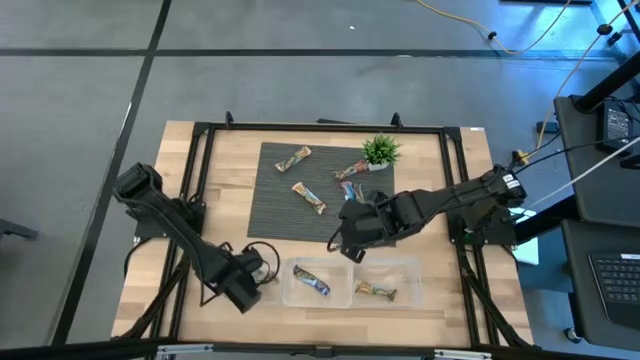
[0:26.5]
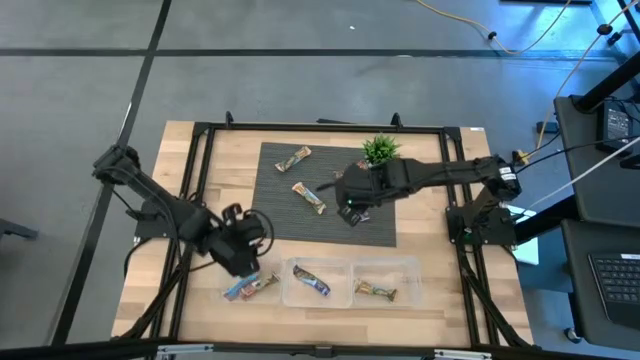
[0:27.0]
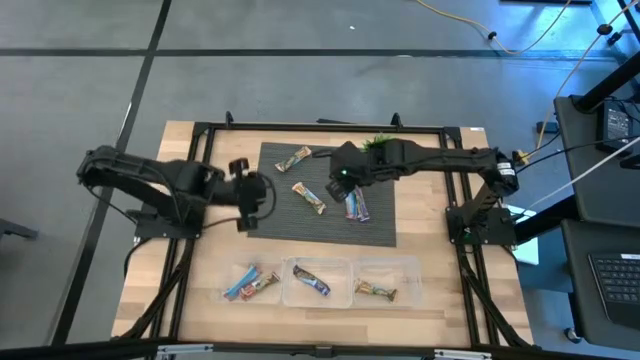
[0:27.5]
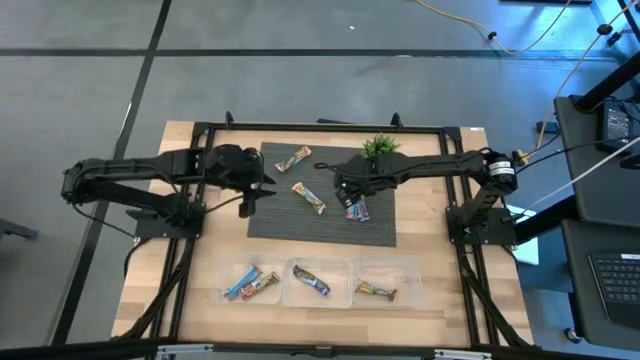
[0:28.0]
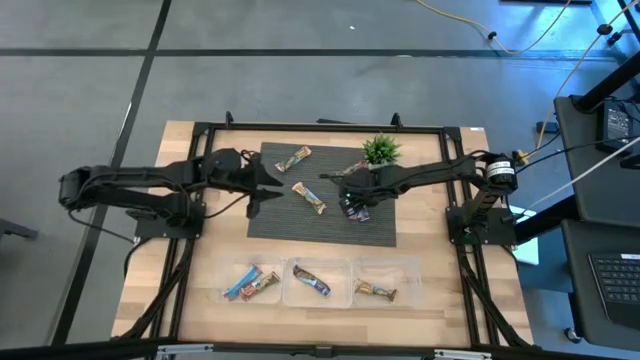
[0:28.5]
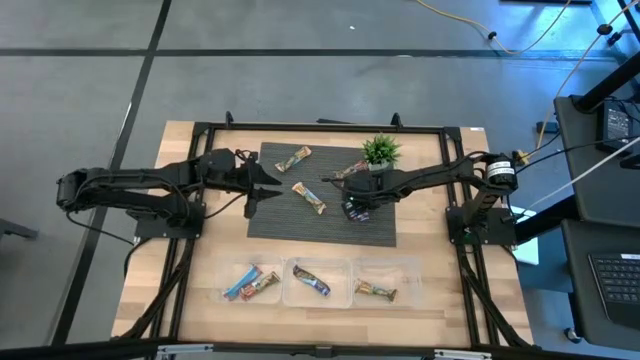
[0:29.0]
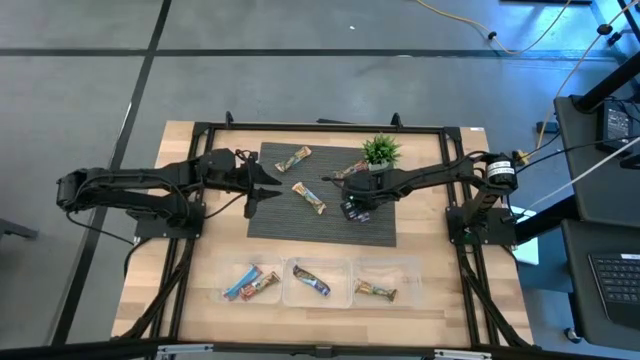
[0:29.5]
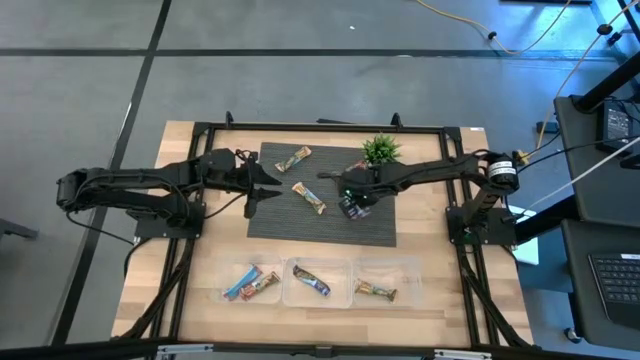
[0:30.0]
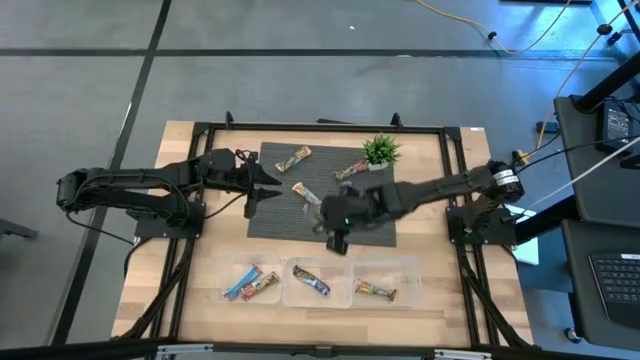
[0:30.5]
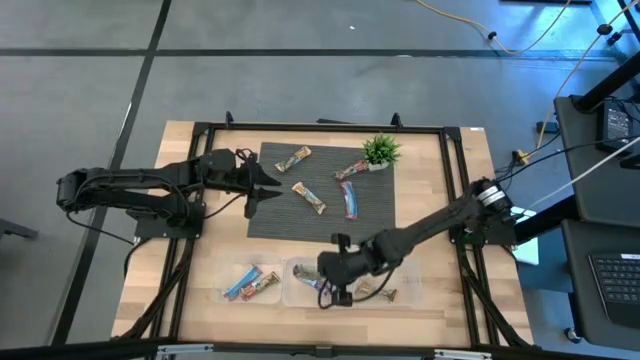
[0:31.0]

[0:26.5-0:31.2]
Task: Pick and place Granola Bars by type
Put the blue granola bar into the middle transparent bin

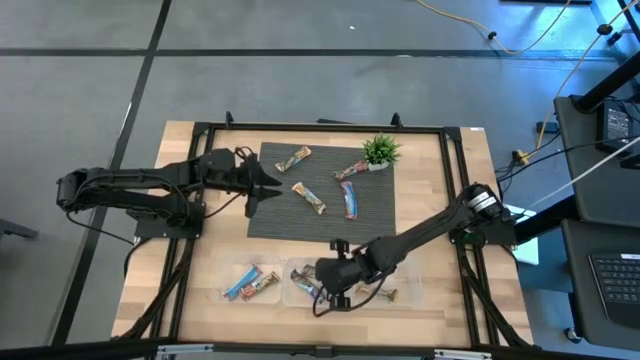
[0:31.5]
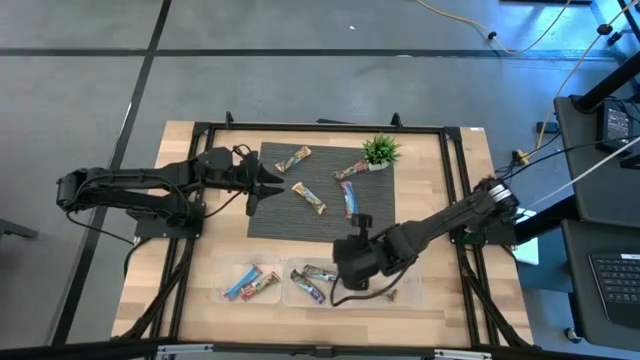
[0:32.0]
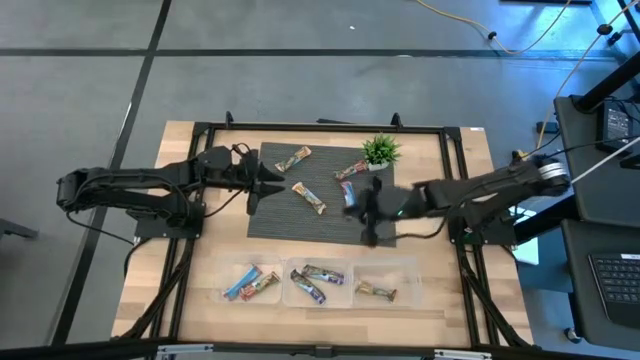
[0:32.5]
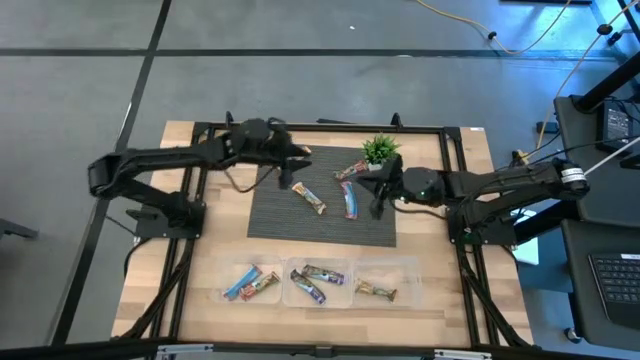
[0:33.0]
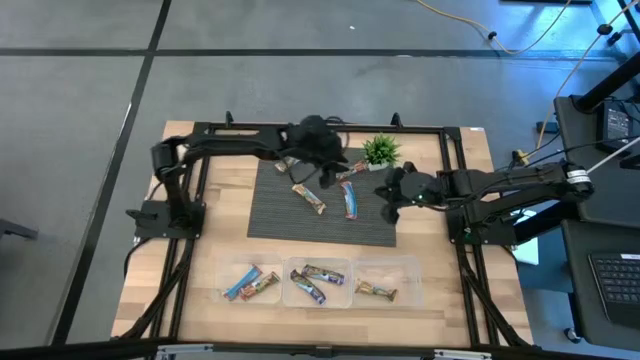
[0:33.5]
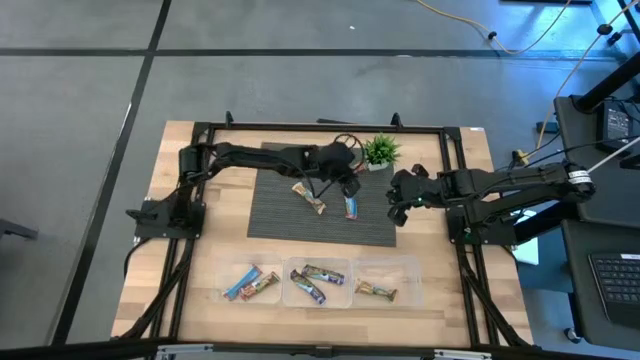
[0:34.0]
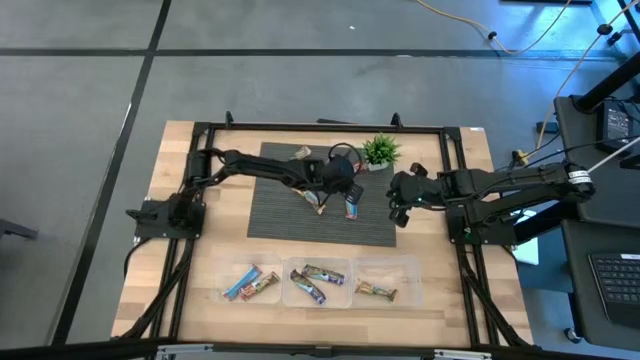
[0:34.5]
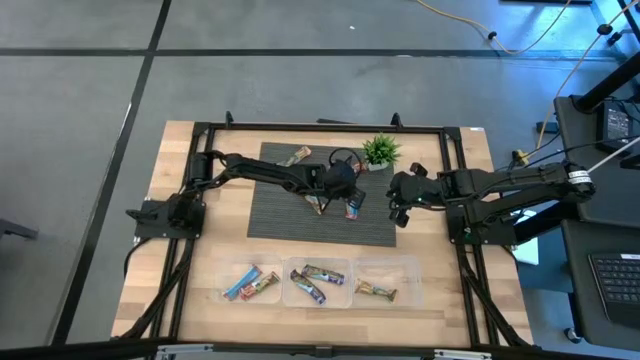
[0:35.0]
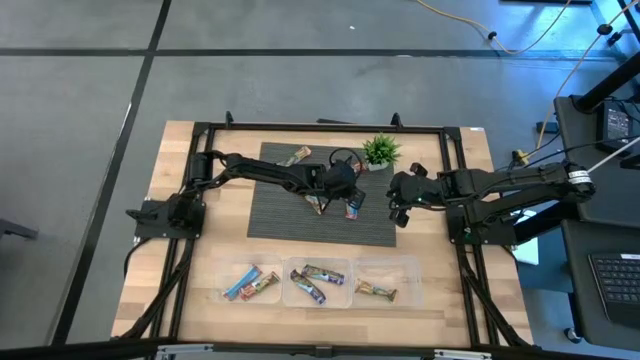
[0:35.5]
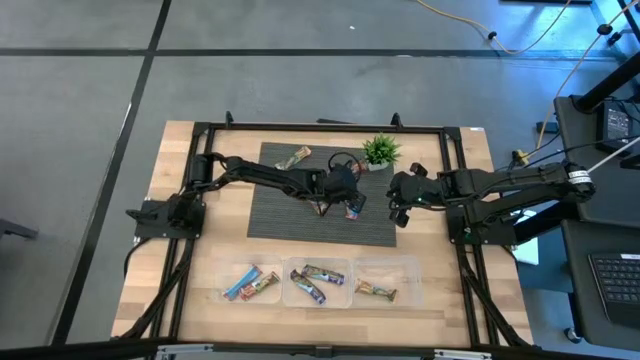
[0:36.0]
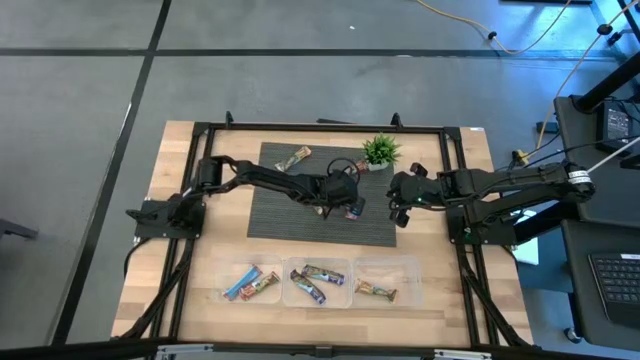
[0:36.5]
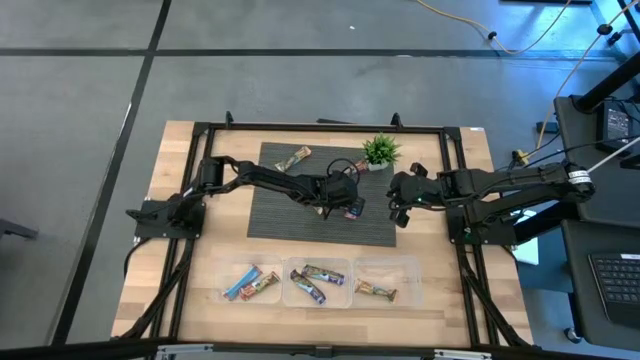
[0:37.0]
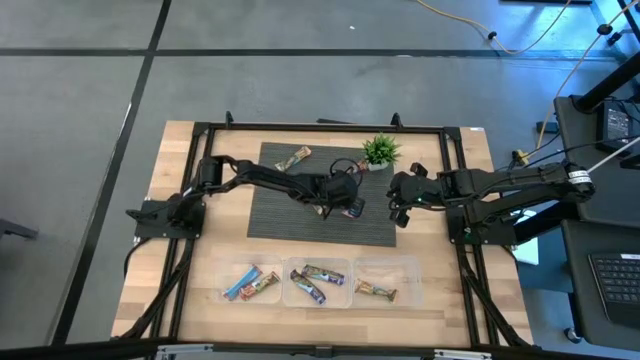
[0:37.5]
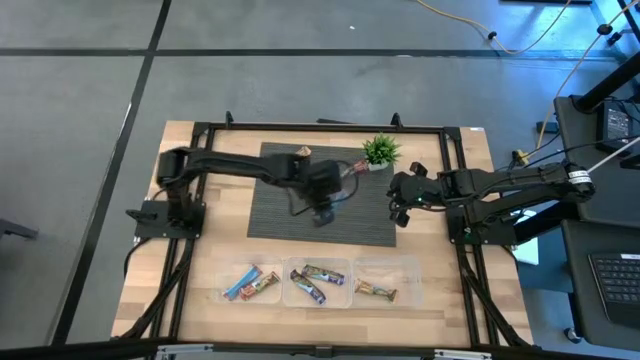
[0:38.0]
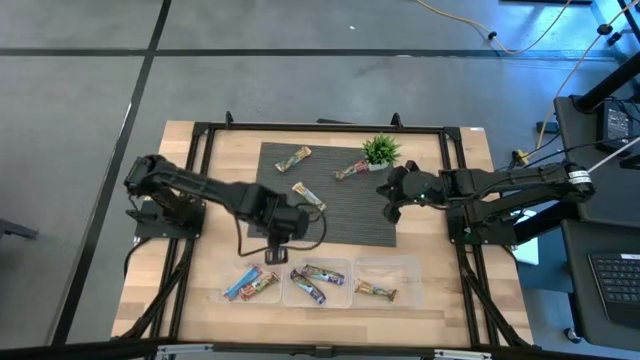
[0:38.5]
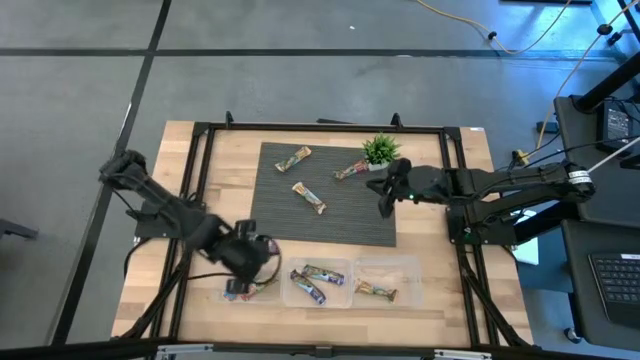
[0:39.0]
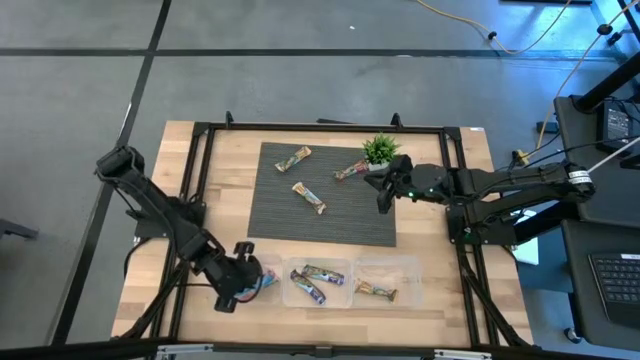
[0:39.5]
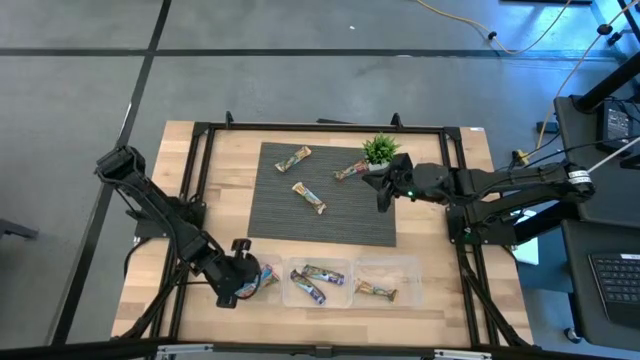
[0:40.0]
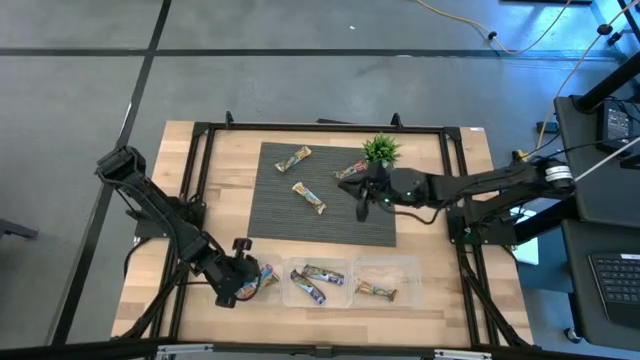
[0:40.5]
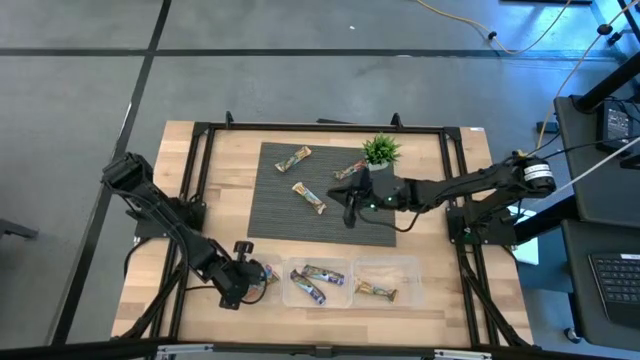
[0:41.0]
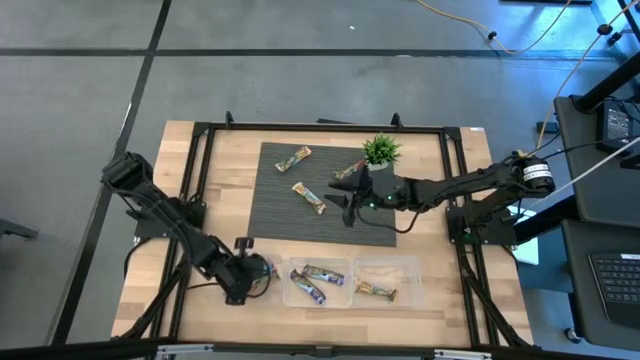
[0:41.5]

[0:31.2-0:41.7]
Put the red granola bar into the left transparent bin

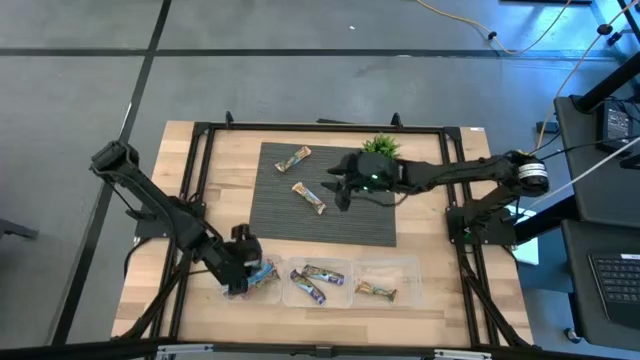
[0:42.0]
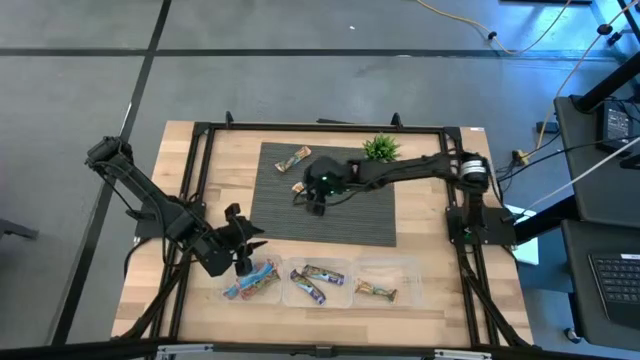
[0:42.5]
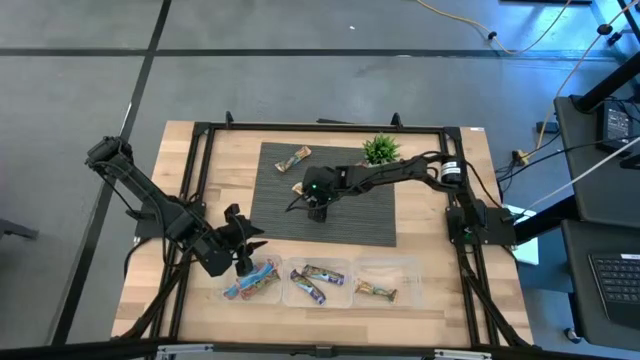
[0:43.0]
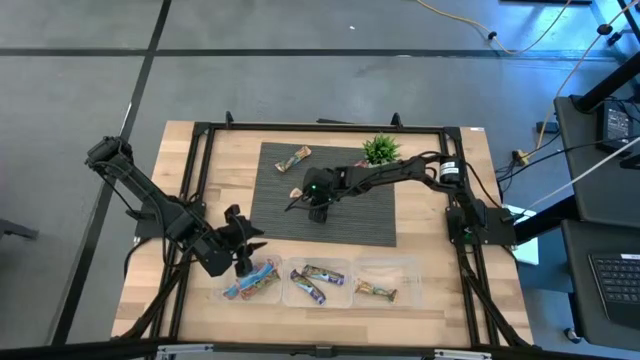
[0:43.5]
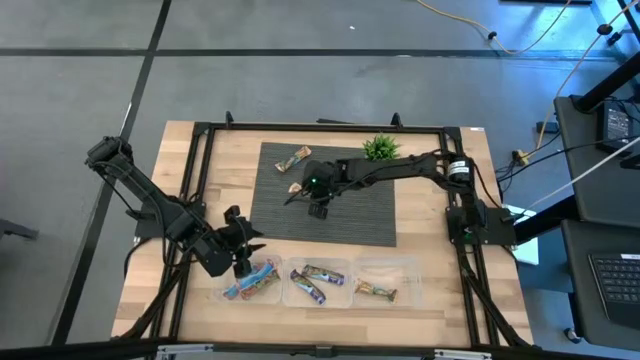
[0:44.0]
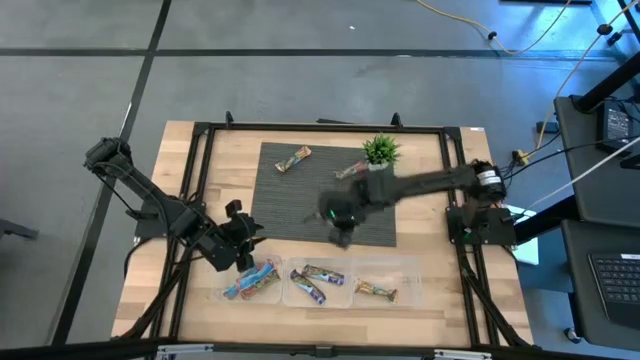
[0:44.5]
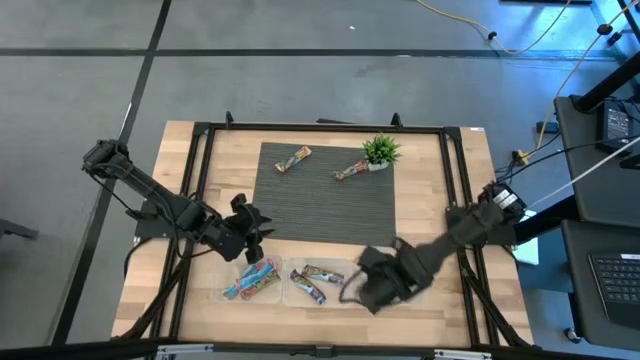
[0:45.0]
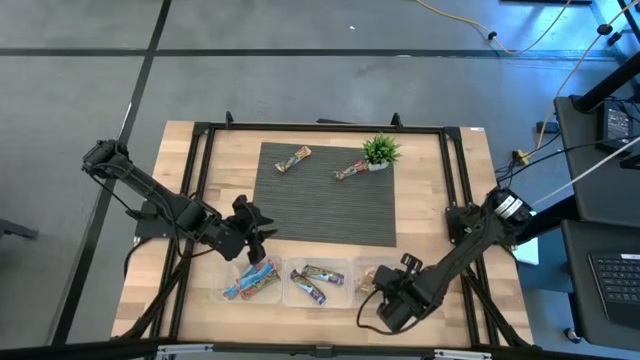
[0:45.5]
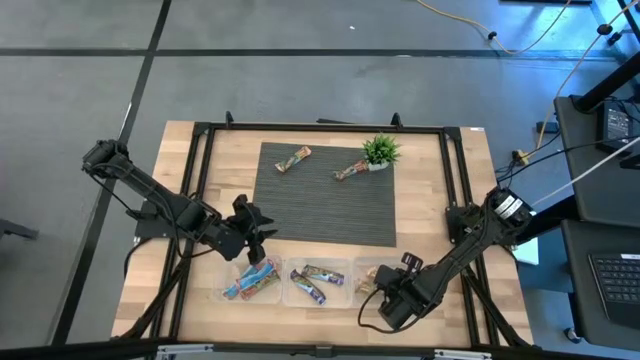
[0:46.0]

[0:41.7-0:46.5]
Put the yellow granola bar into the right transparent bin

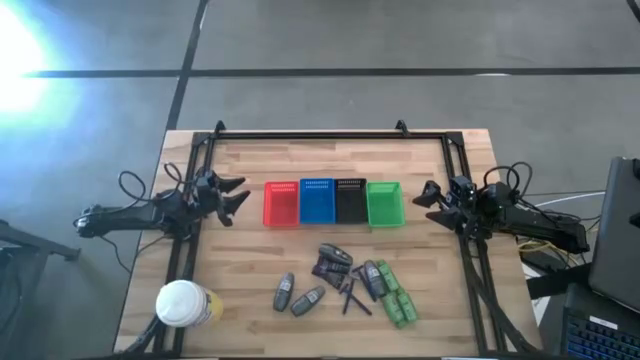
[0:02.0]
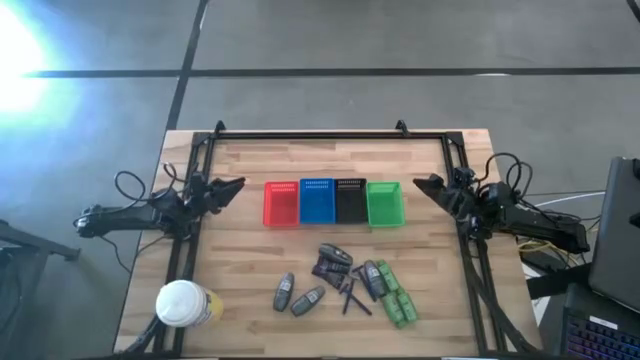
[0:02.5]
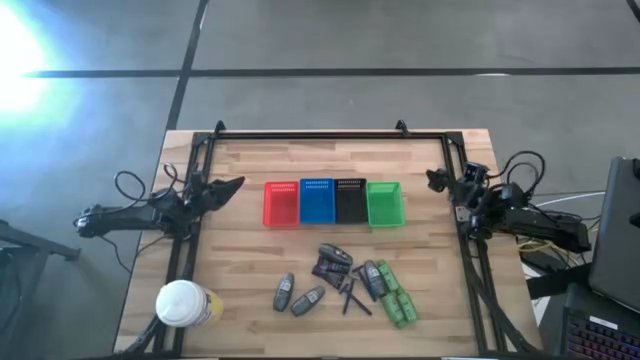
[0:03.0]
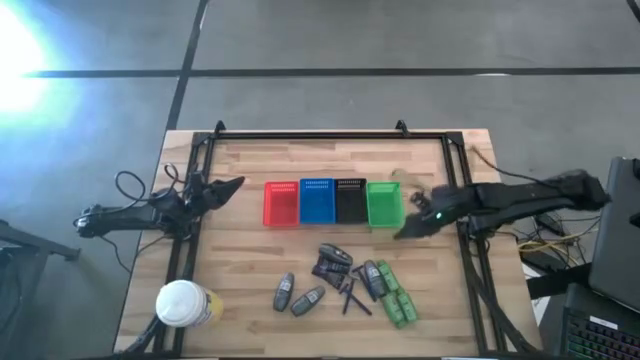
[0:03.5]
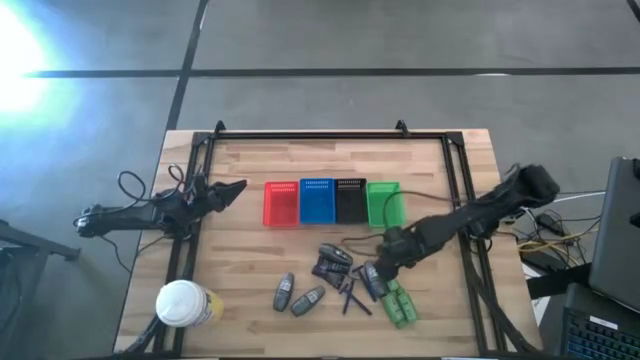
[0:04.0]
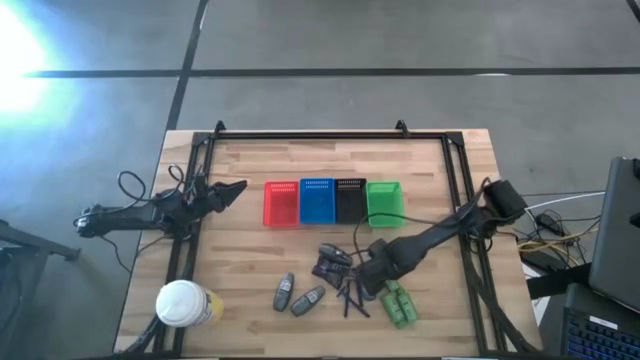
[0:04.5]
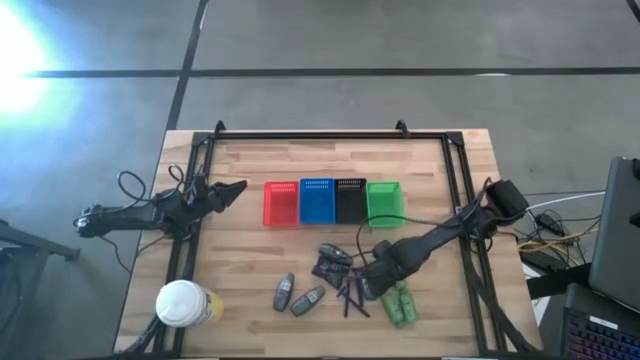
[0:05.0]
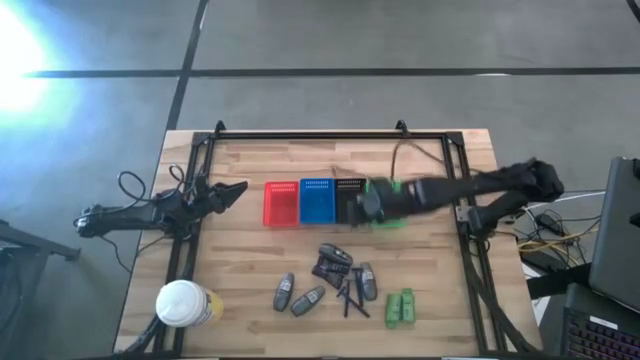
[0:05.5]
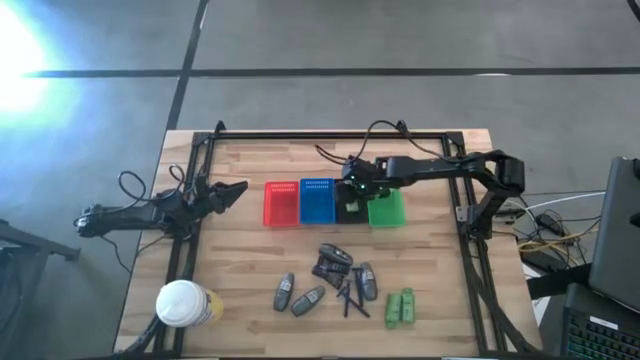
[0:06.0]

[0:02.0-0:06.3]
Task: Pick & Place Travel size toiletries
Put the green shampoo into the black basket
